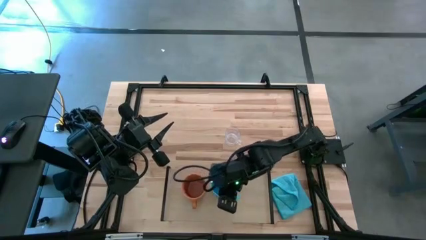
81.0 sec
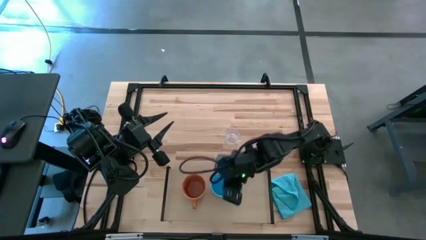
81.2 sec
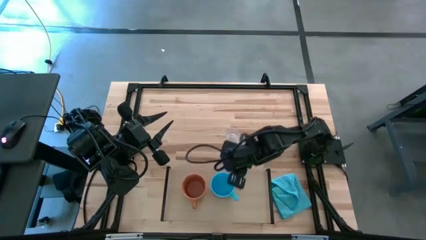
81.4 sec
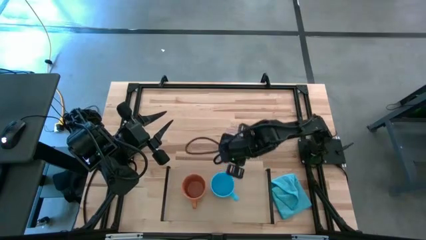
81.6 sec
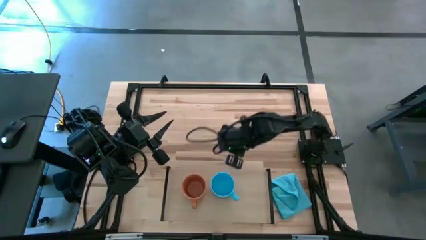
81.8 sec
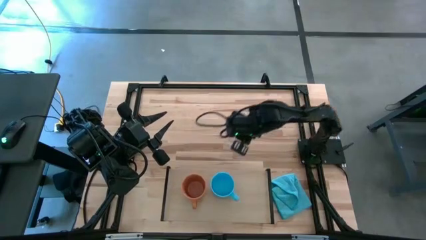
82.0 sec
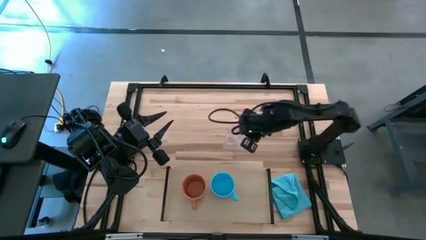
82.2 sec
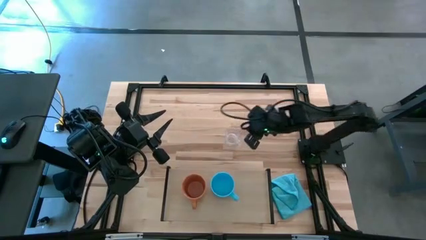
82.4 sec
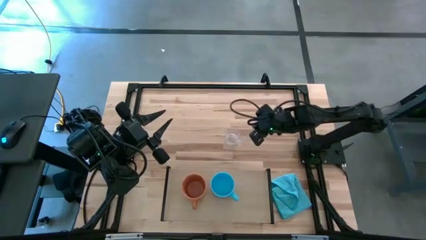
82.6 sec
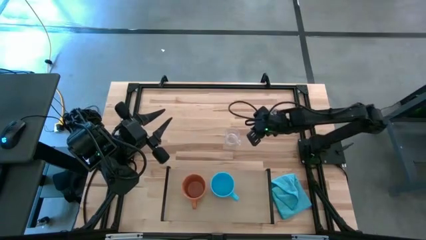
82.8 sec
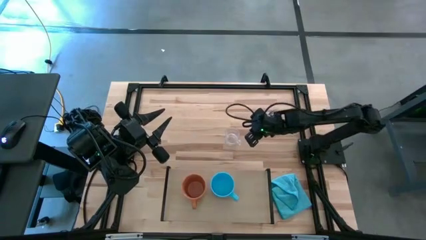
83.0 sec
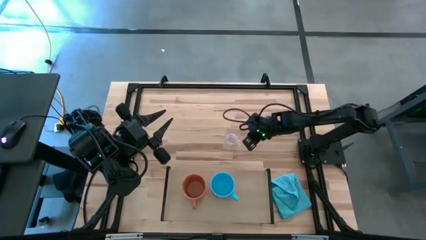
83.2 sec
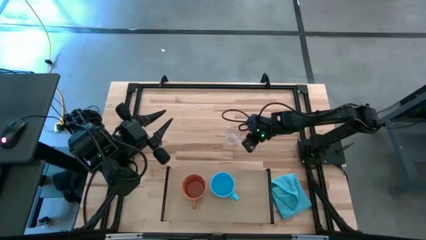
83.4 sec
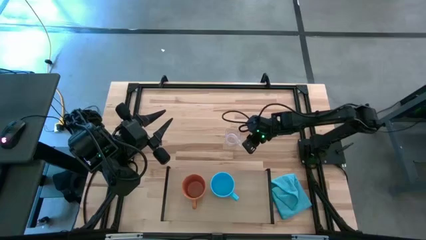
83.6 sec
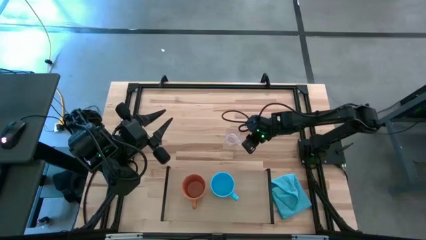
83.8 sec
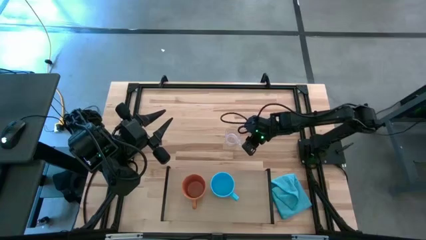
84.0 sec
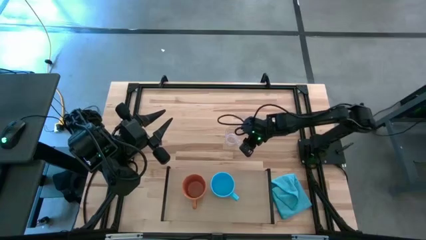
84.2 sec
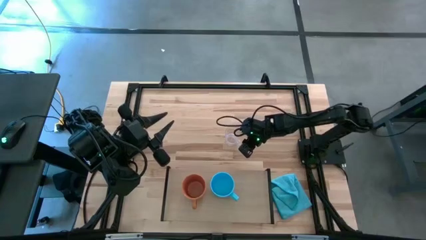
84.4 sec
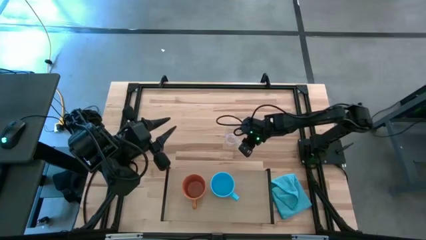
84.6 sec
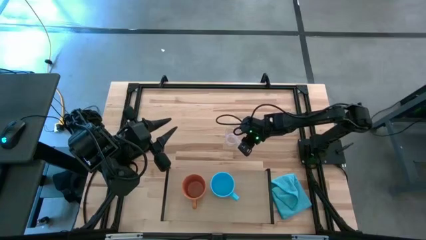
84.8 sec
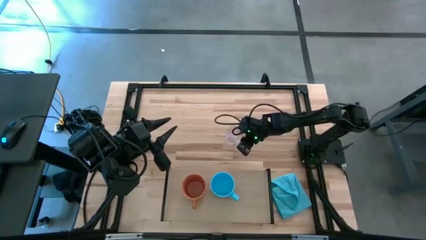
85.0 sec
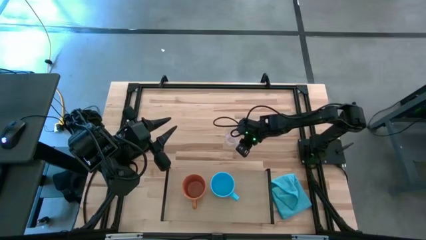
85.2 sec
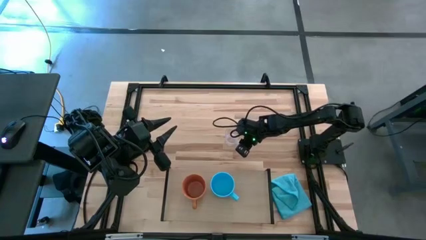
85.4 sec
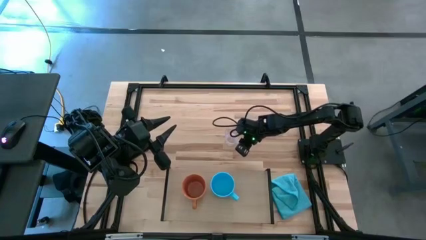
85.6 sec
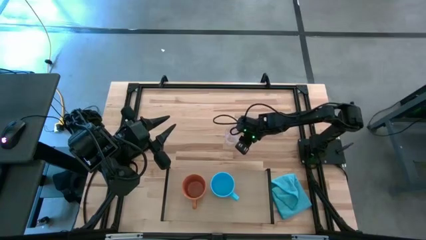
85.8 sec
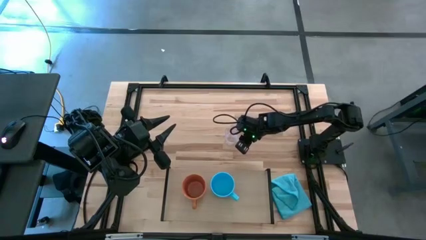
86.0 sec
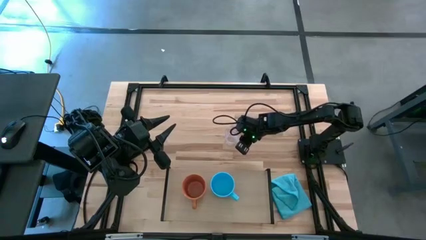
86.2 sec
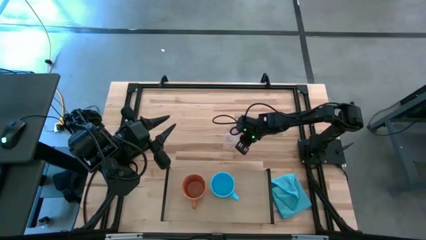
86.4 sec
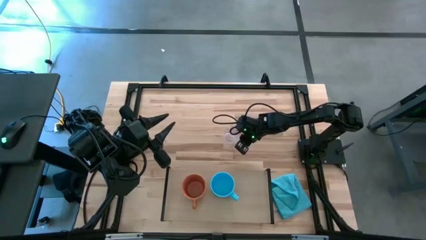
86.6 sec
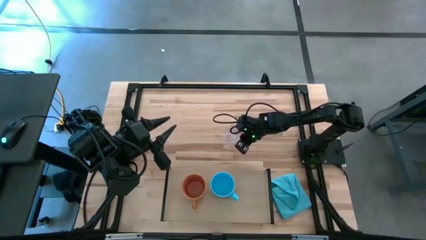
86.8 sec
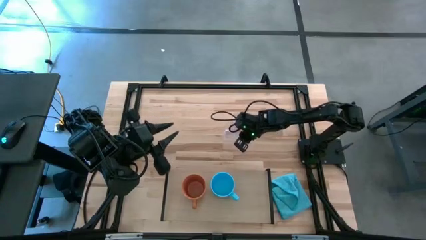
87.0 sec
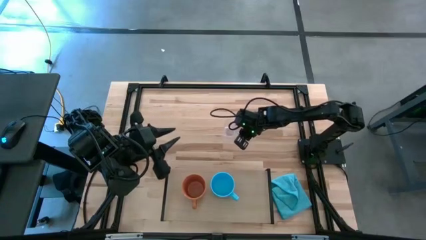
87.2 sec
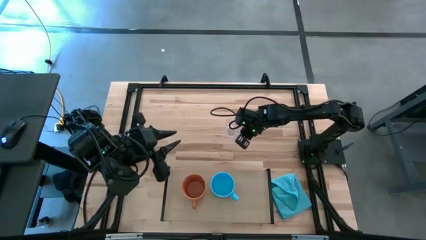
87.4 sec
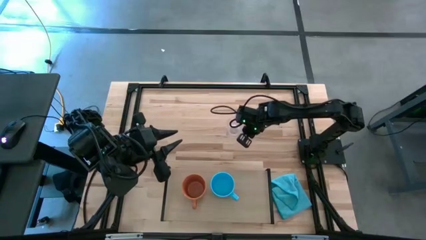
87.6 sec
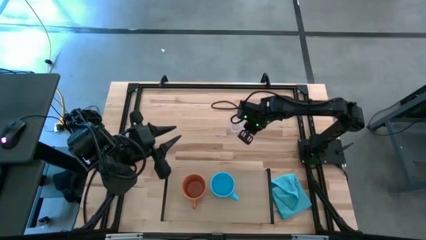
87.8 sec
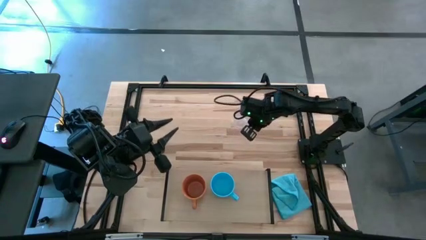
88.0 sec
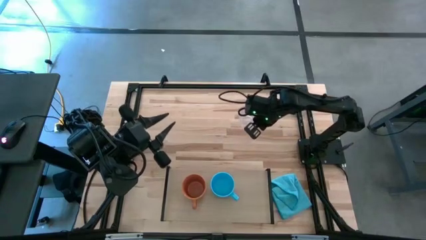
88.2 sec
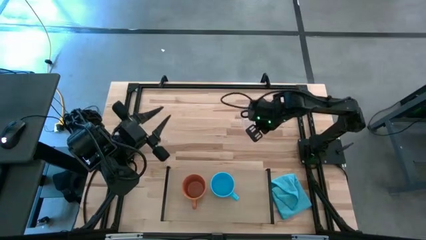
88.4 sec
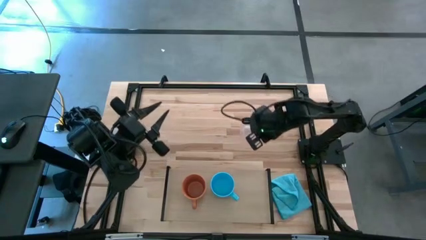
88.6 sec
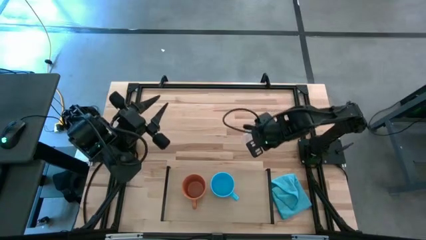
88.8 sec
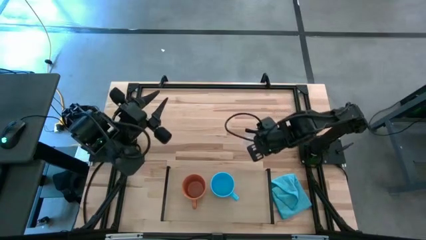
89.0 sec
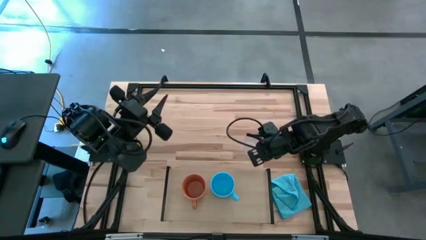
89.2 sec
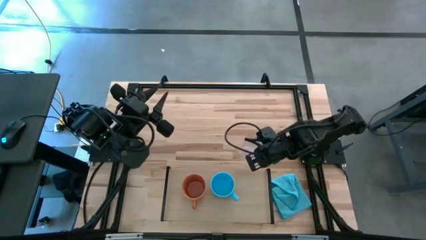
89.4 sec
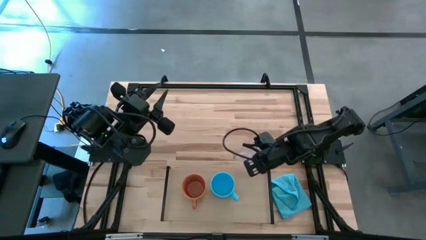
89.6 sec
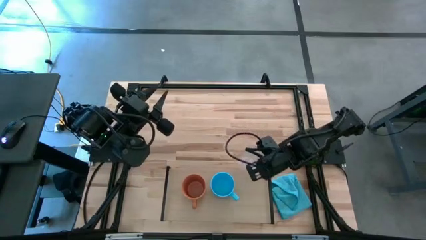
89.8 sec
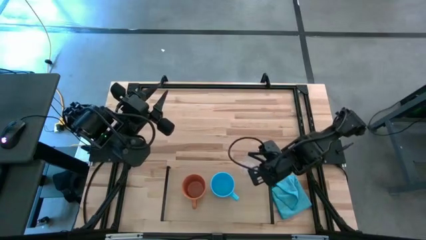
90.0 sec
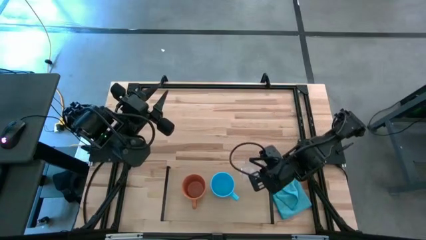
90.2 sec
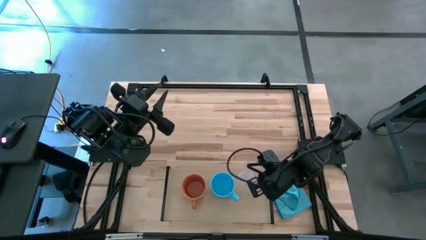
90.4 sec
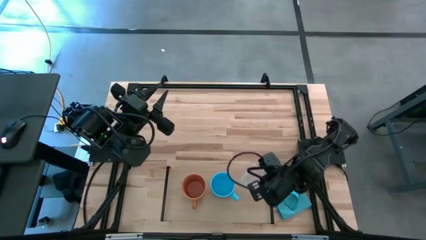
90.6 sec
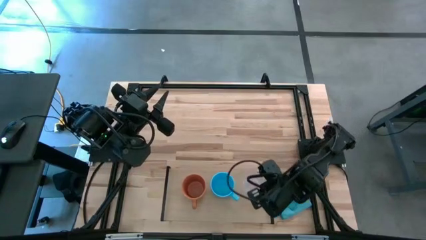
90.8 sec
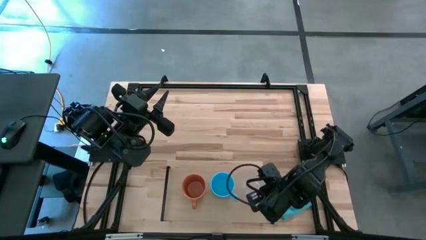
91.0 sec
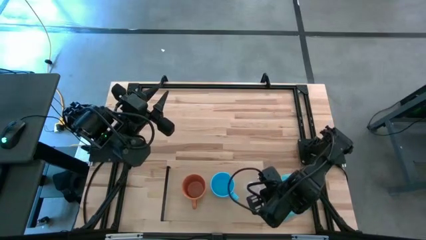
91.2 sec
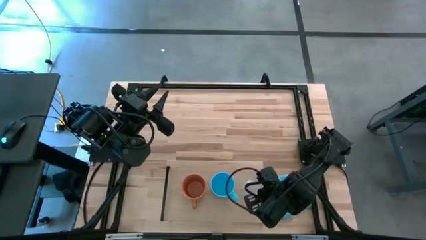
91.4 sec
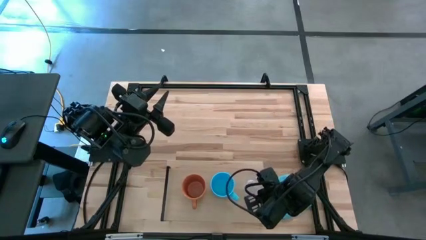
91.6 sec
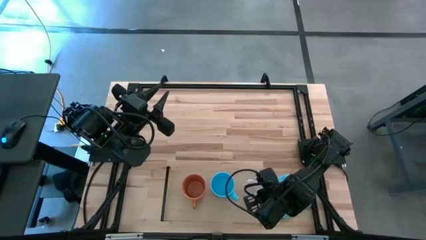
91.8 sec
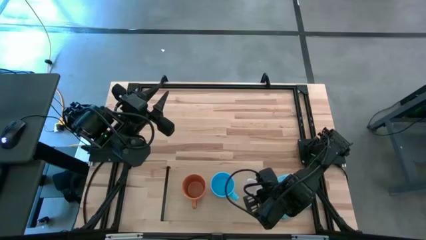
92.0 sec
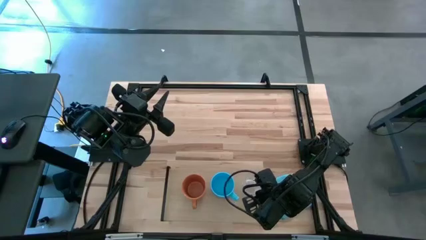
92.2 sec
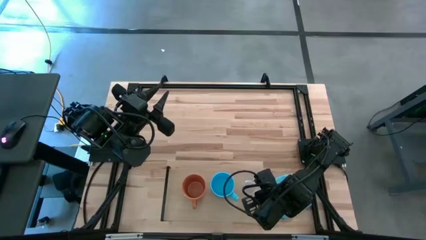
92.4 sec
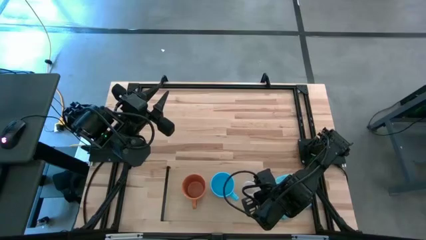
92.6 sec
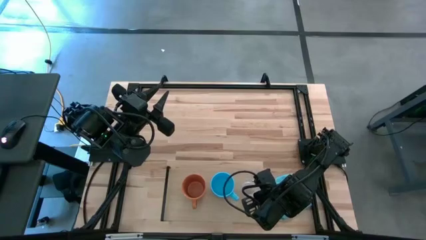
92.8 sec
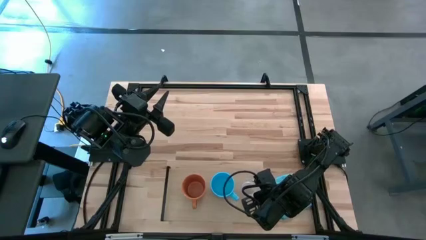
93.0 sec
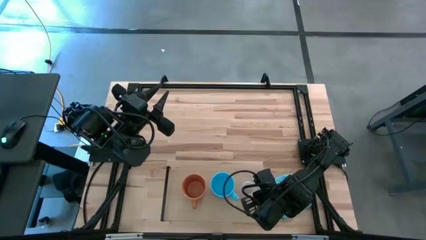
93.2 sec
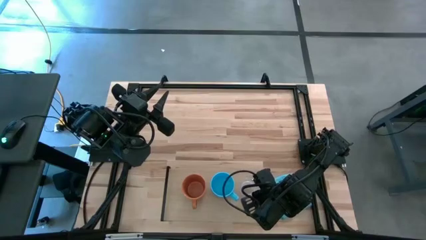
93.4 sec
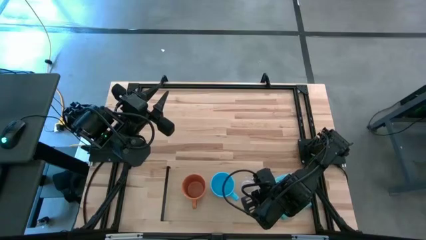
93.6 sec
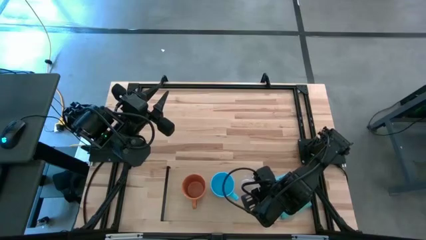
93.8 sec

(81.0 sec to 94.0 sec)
Task: Stack small to large cups/mugs on shelf
Put the transparent mug on the shelf

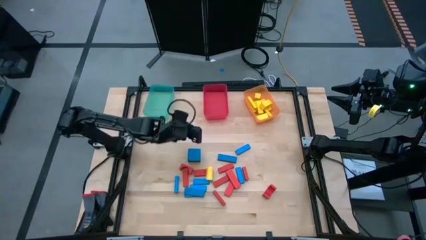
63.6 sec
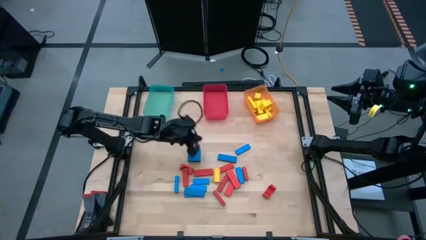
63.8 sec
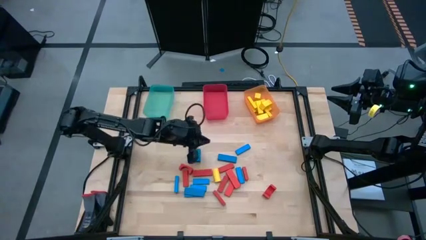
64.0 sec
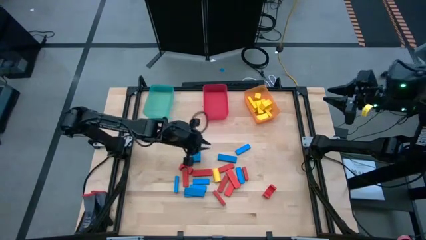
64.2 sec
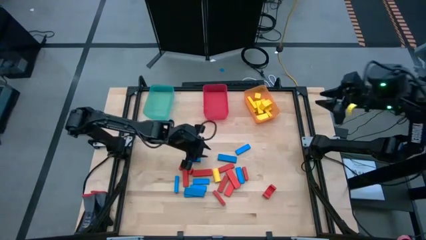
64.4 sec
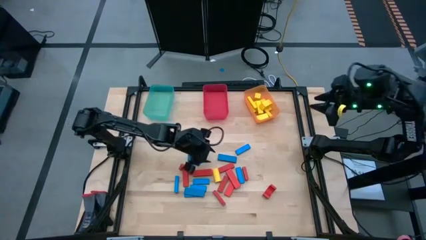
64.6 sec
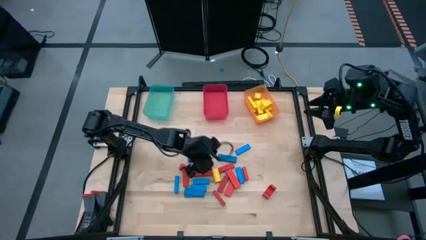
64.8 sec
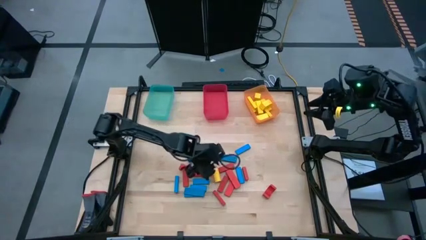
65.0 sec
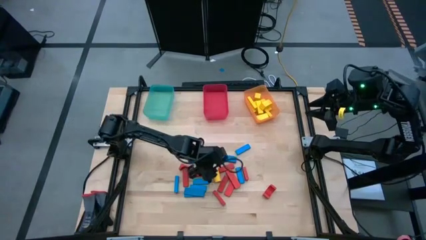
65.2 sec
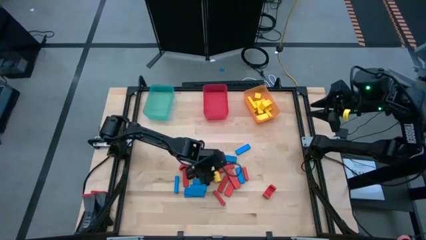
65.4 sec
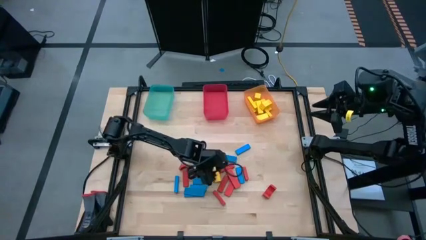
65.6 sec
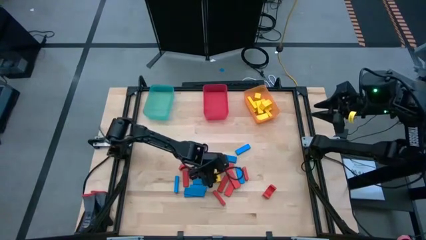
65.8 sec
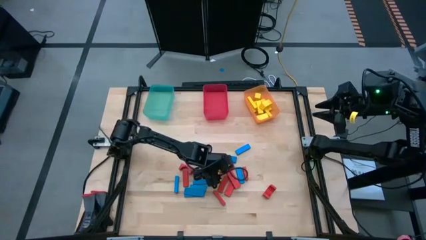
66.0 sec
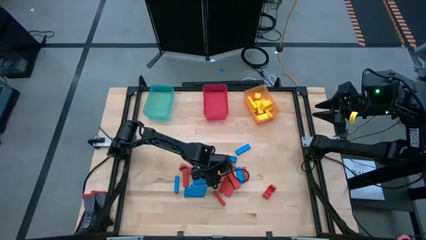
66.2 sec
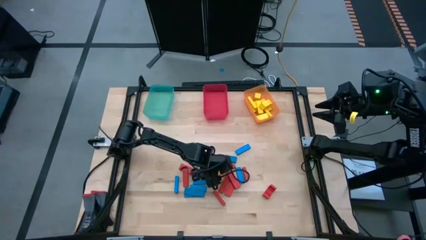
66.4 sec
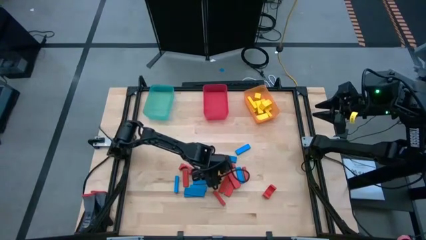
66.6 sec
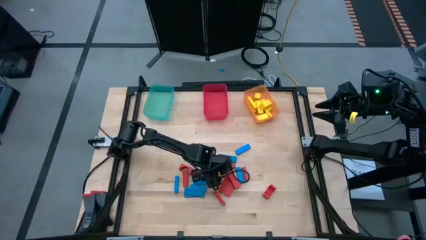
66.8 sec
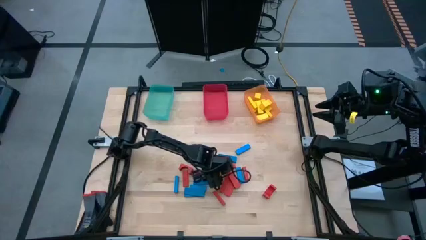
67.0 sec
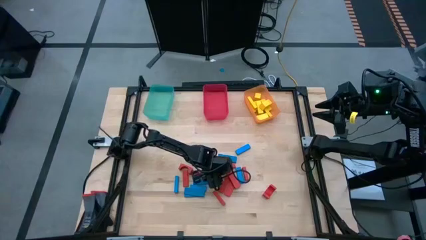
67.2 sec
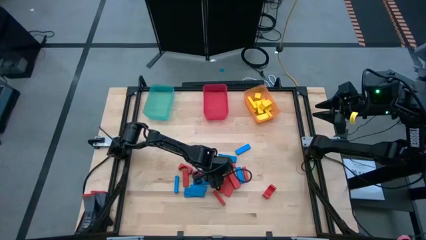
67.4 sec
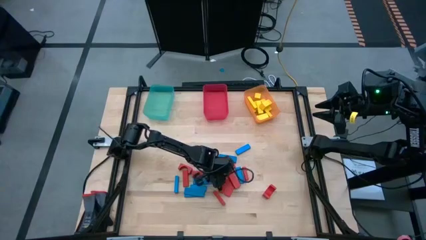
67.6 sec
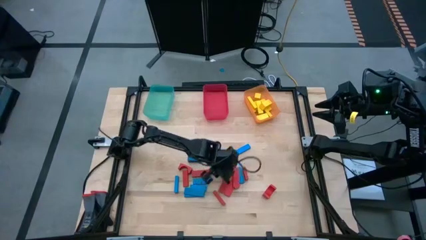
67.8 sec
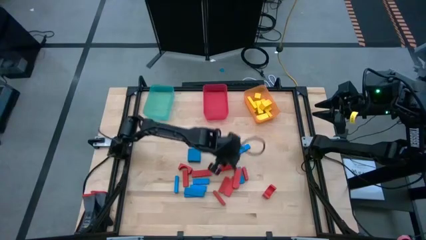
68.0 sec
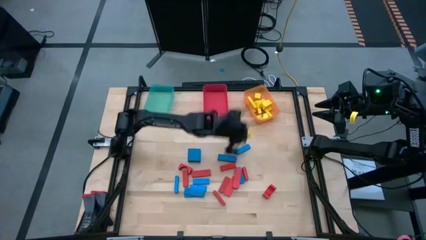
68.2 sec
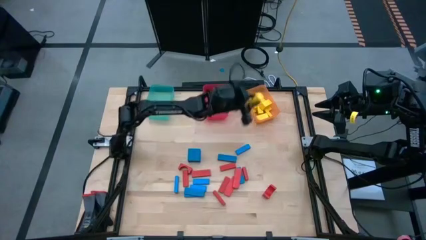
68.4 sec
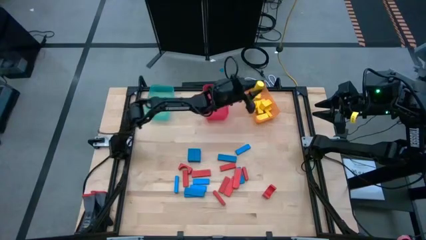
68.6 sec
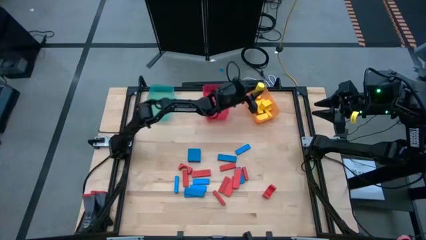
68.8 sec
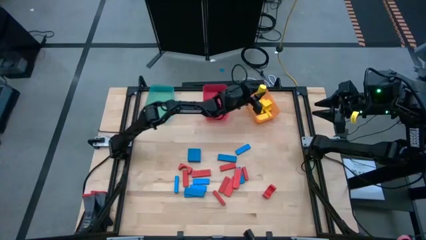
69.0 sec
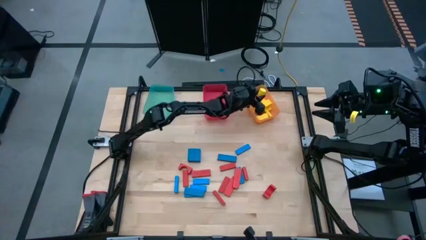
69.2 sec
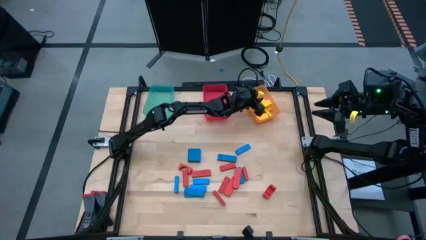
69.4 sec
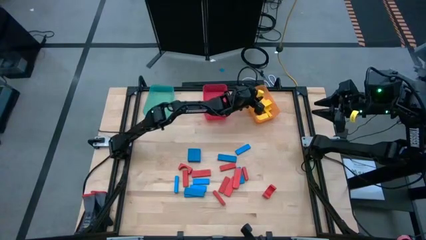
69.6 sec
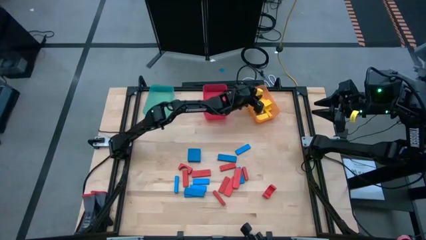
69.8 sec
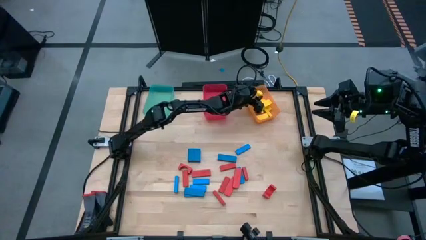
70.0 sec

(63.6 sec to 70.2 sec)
Task: Sort blocks
Put the yellow block into the orange bin
